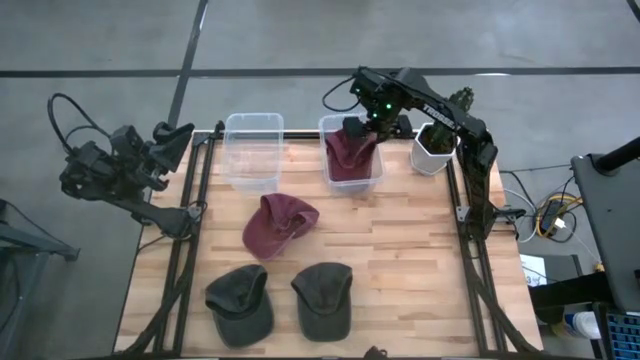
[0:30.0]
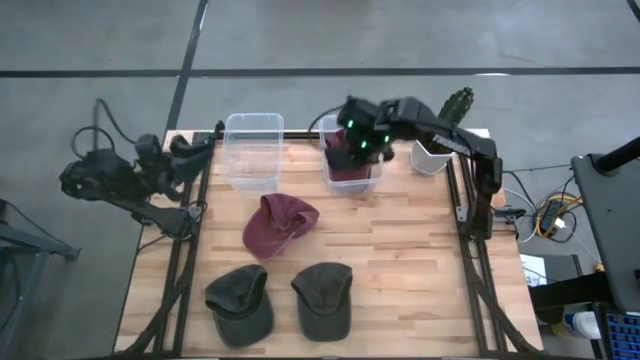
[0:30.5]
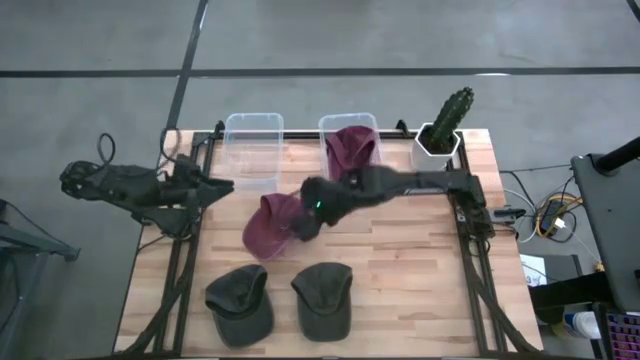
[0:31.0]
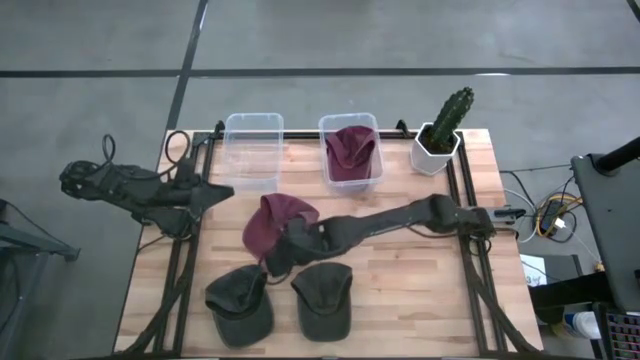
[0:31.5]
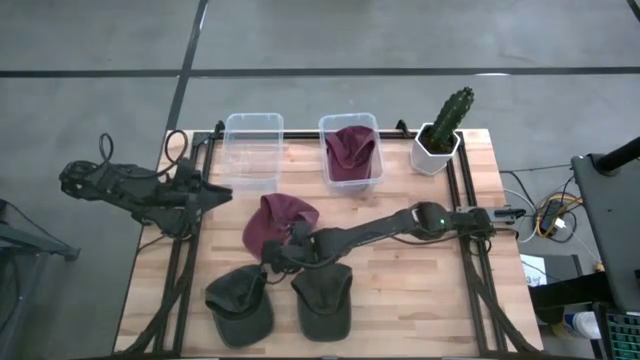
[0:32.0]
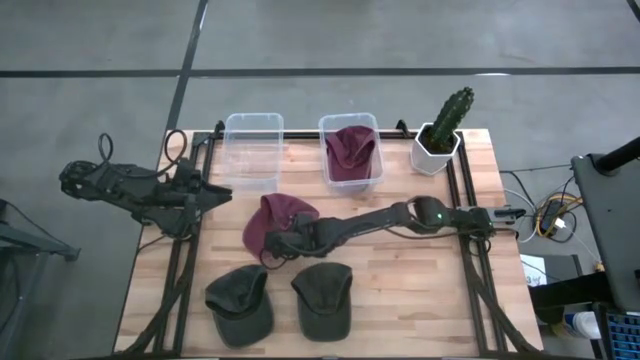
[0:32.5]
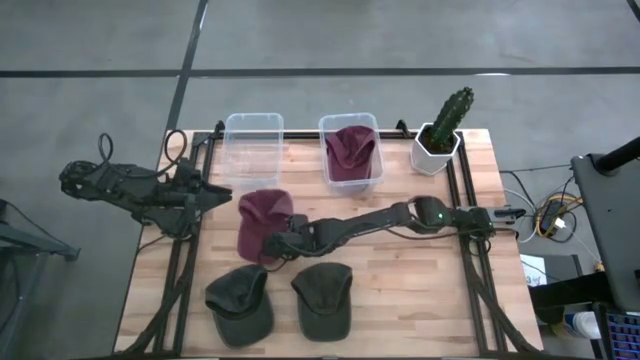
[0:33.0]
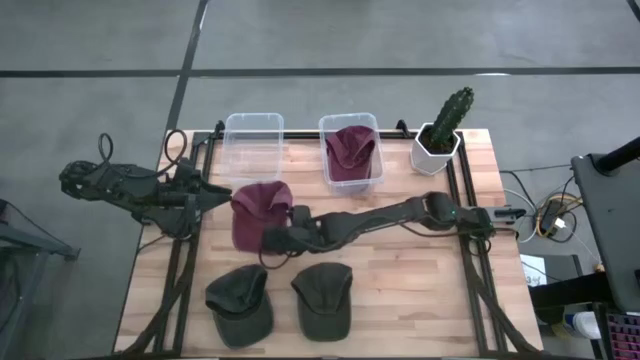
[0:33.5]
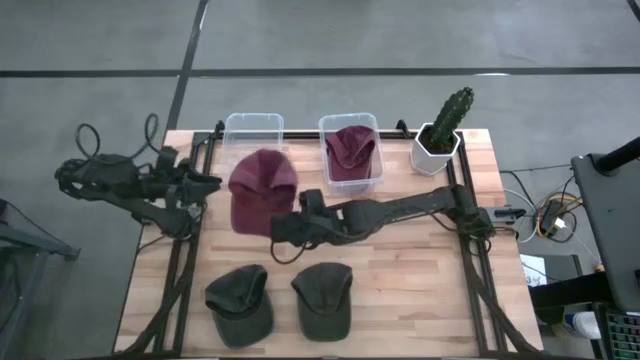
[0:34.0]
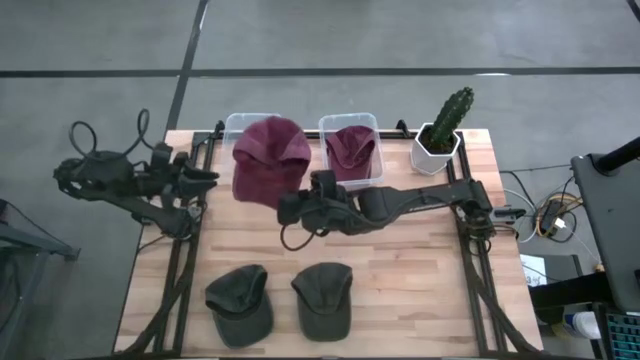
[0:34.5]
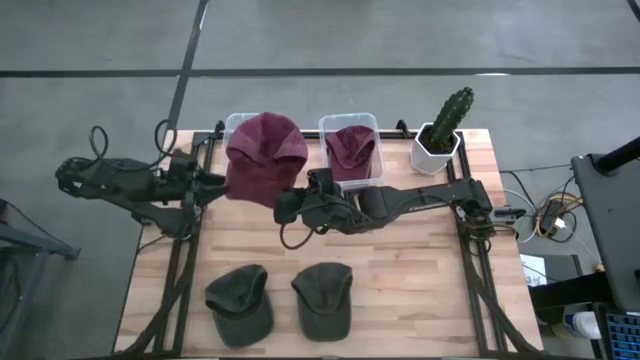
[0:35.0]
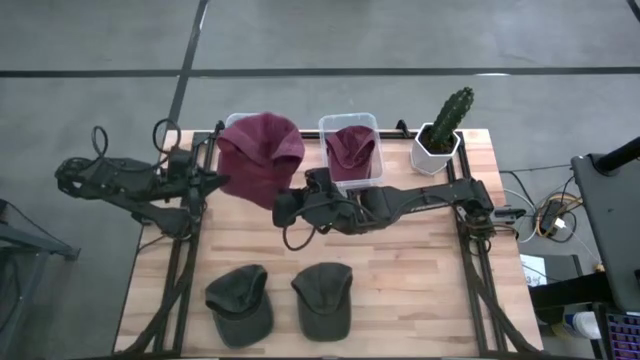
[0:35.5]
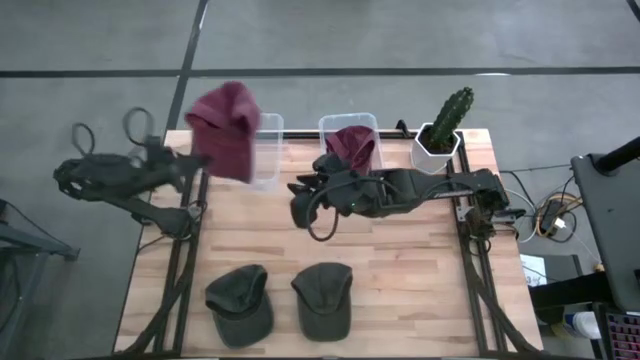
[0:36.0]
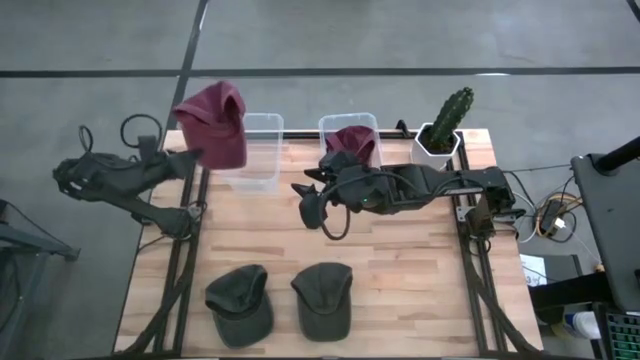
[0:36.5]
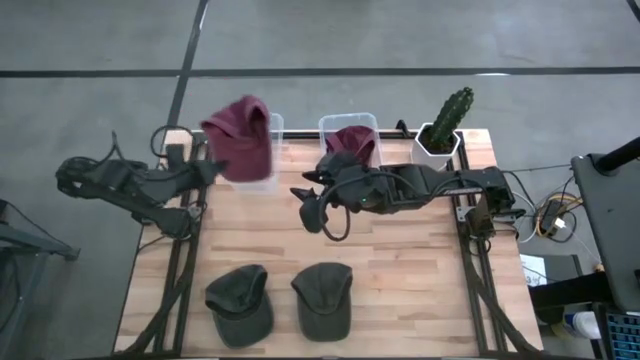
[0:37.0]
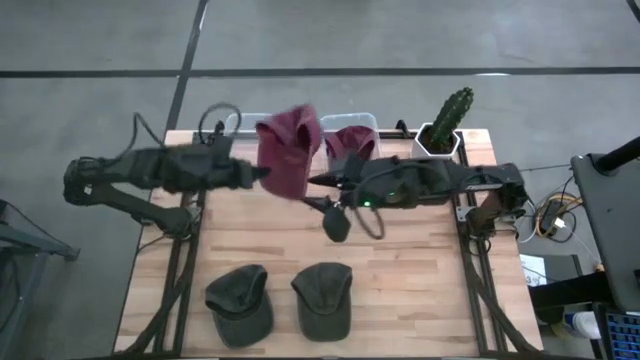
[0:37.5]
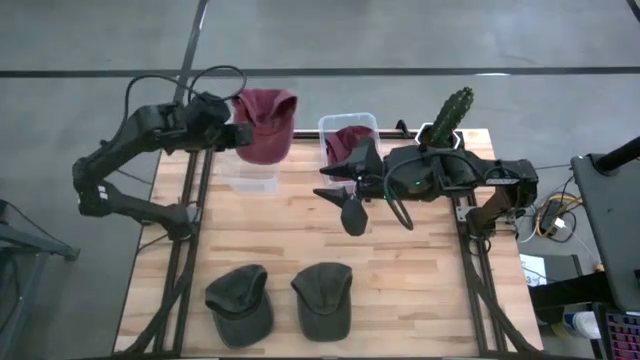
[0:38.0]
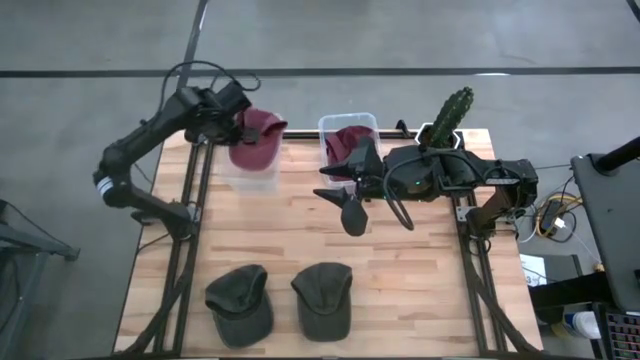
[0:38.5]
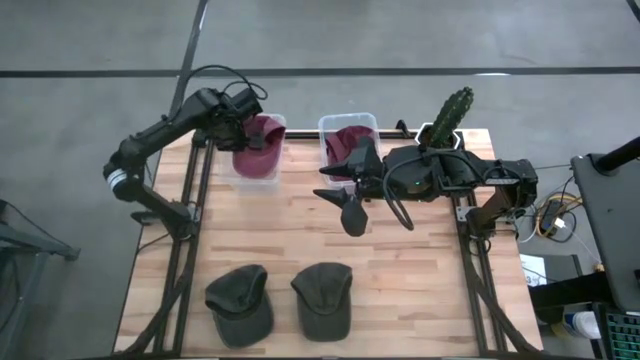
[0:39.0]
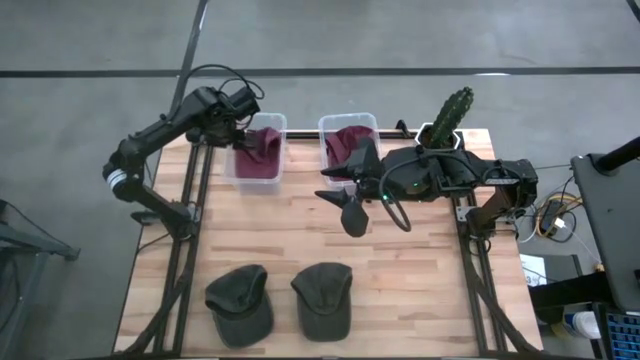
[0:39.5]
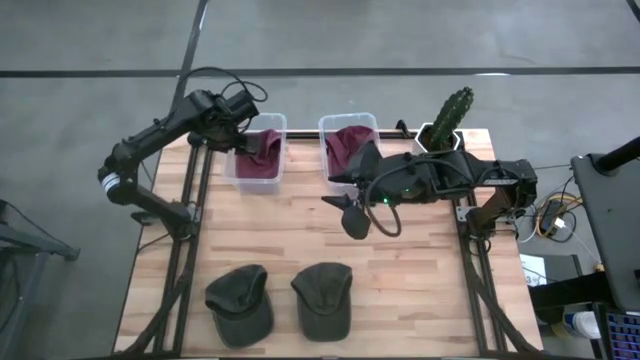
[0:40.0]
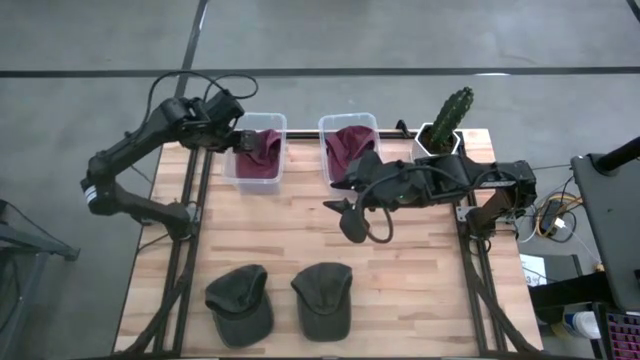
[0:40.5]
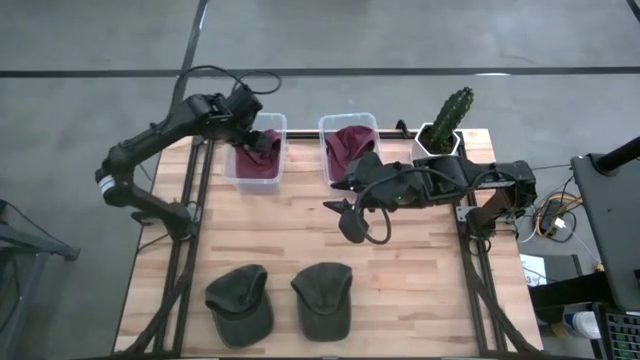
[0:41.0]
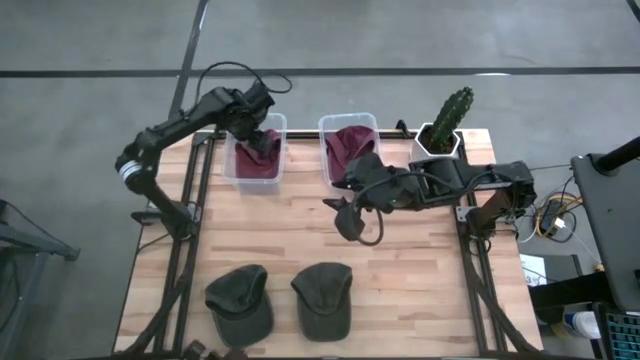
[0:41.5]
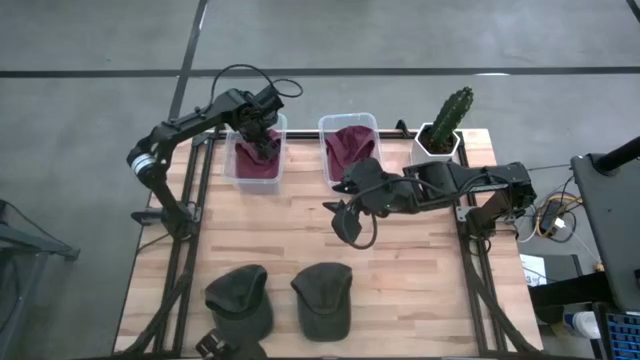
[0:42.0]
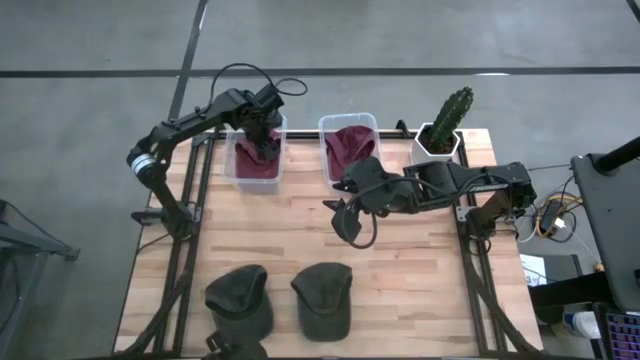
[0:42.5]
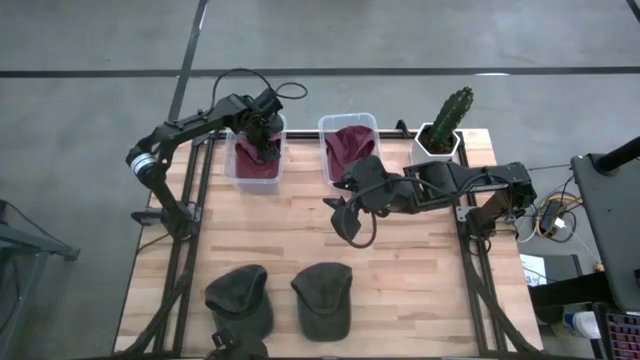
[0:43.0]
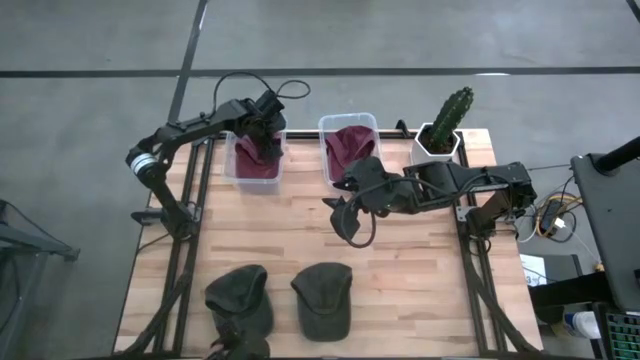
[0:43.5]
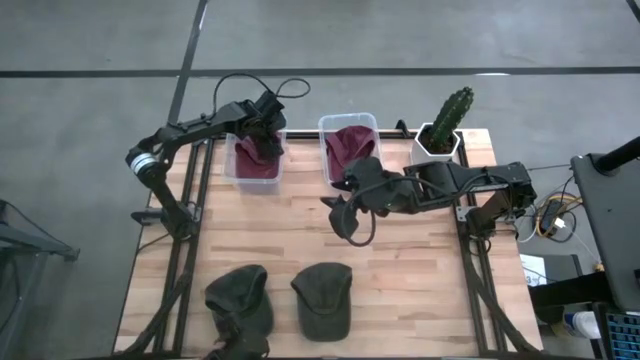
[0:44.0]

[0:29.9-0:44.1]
Task: Pick & Place hat
Put the red cap into the right transparent bin

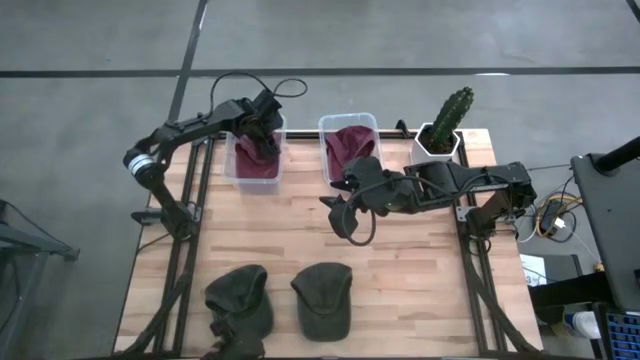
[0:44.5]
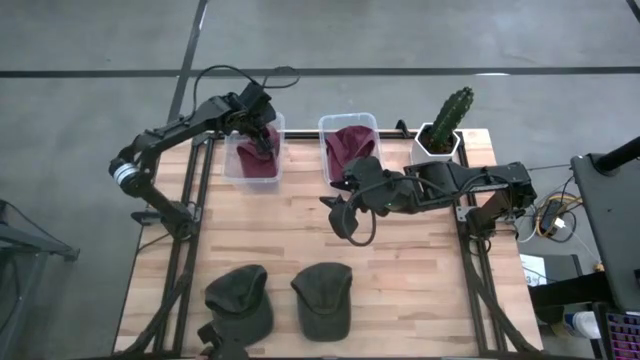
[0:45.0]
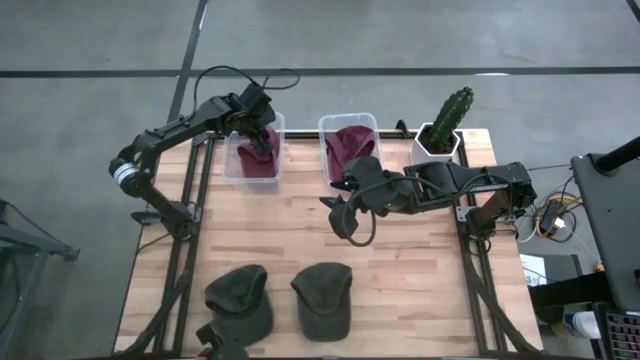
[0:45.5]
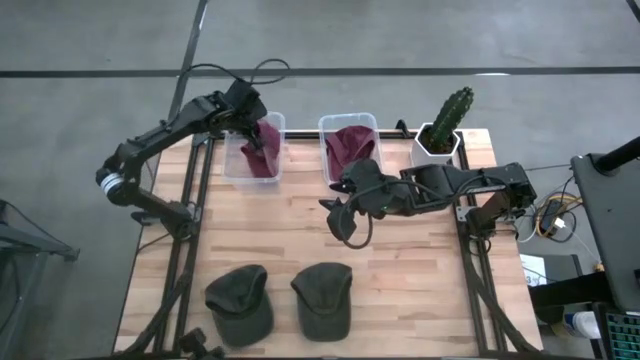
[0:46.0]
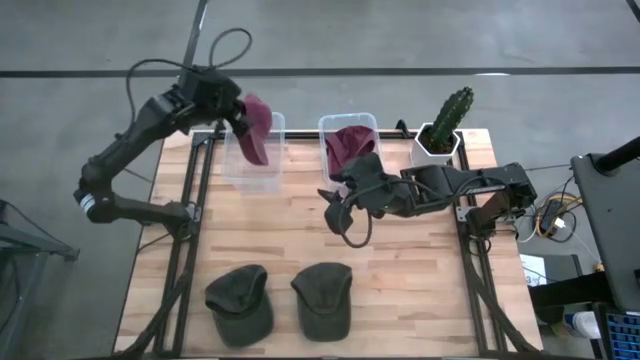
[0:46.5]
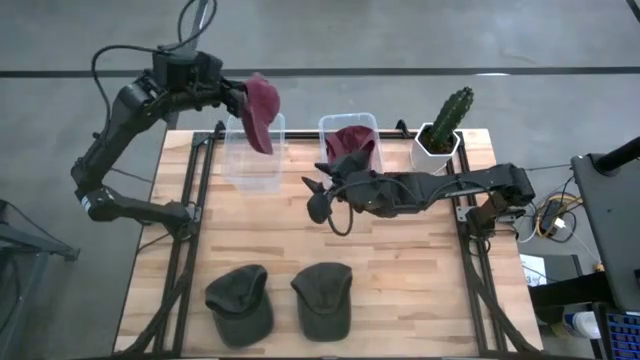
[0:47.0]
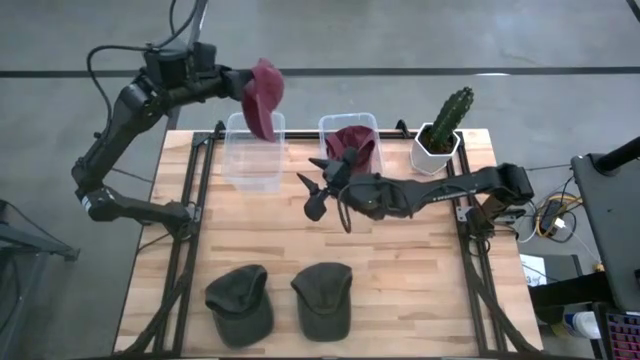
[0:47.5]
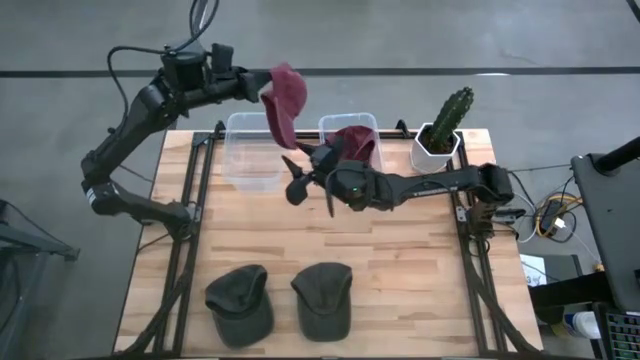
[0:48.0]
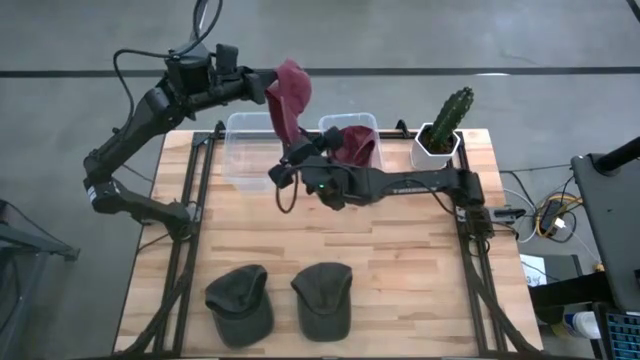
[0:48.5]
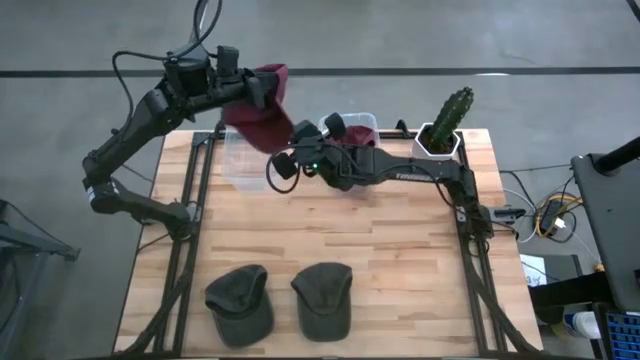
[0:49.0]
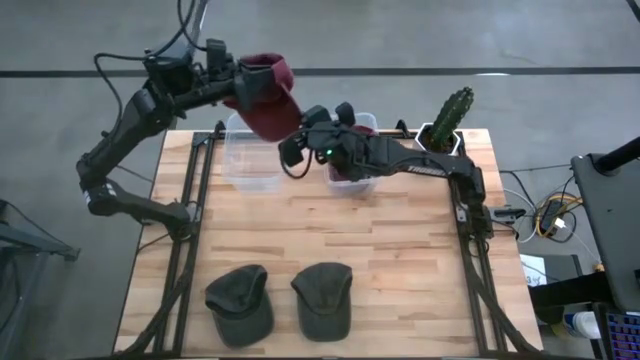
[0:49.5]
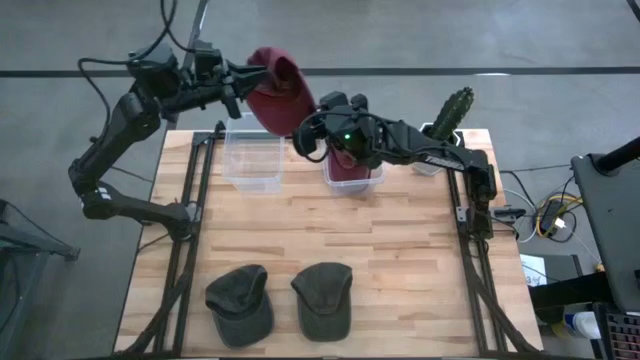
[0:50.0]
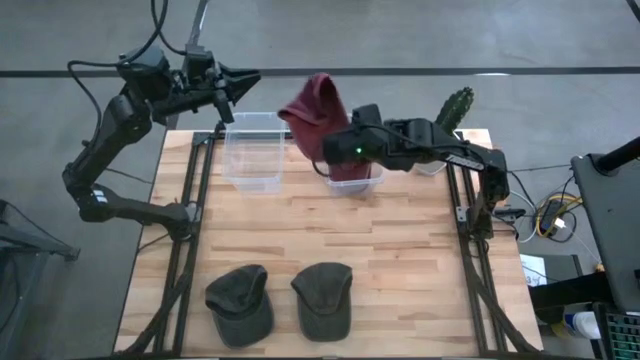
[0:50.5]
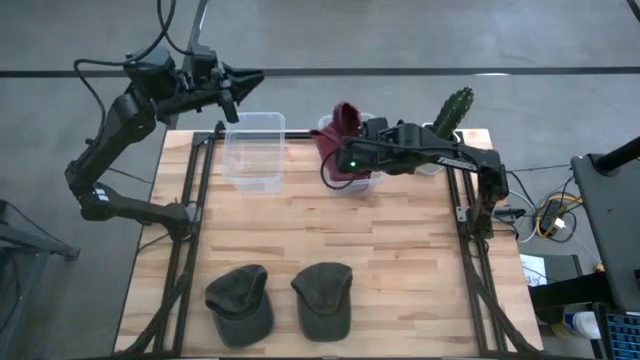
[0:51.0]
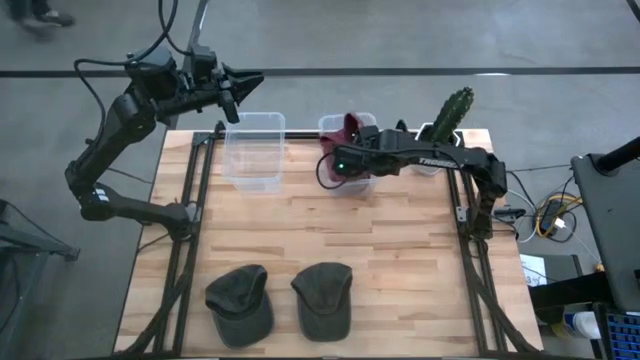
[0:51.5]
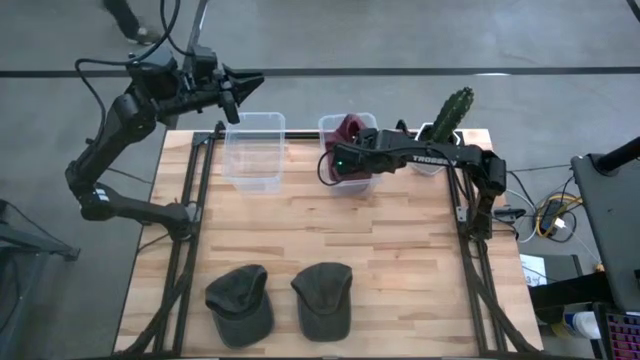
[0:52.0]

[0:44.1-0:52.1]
Put the red cap into the right transparent bin
